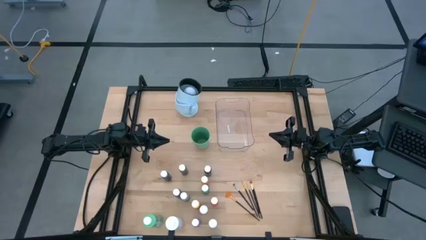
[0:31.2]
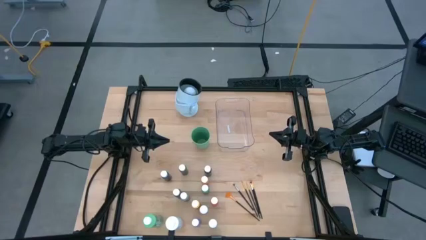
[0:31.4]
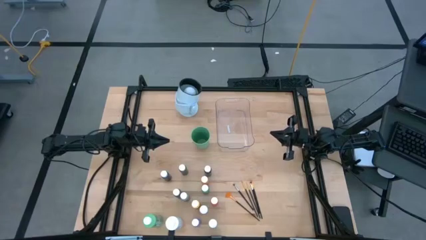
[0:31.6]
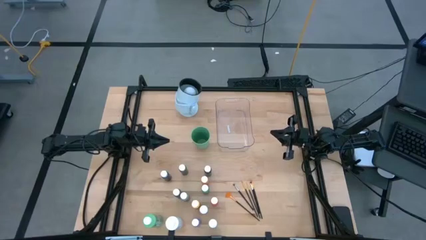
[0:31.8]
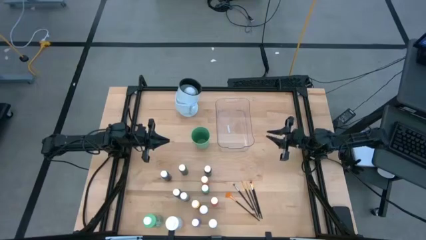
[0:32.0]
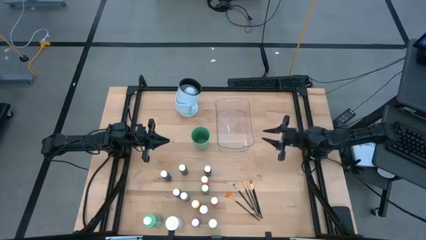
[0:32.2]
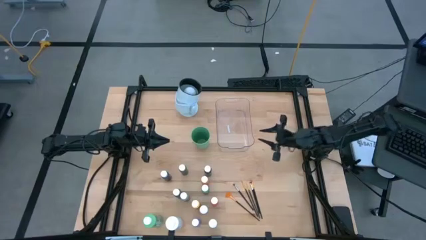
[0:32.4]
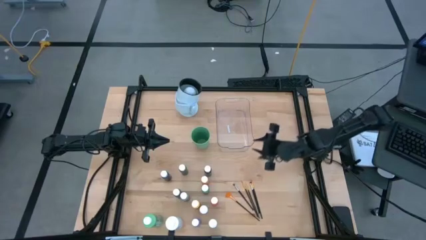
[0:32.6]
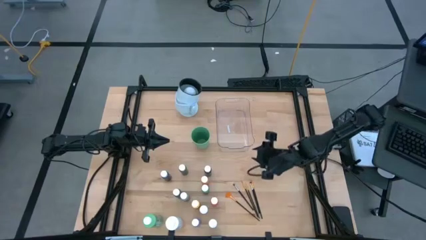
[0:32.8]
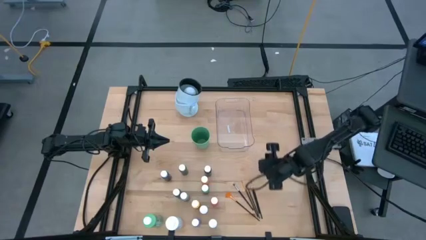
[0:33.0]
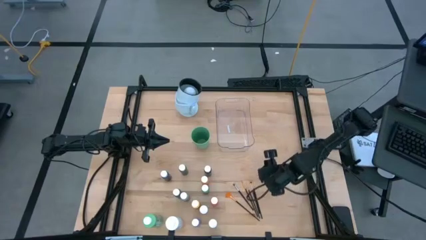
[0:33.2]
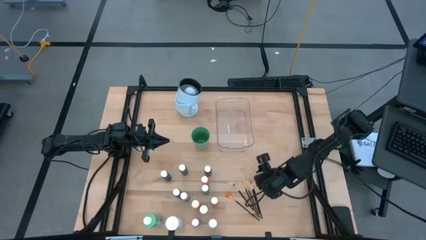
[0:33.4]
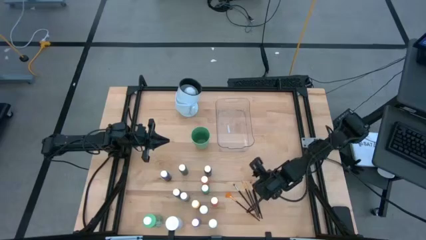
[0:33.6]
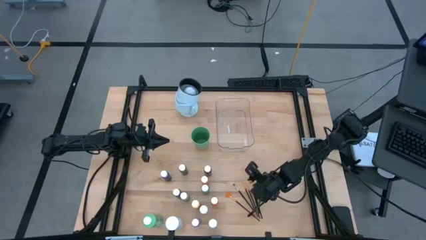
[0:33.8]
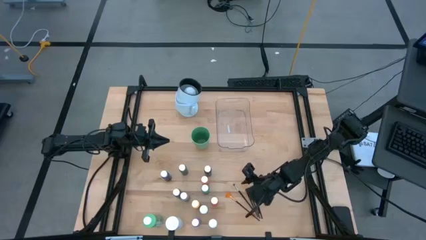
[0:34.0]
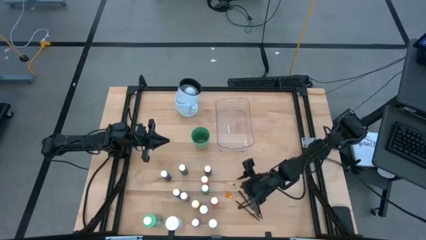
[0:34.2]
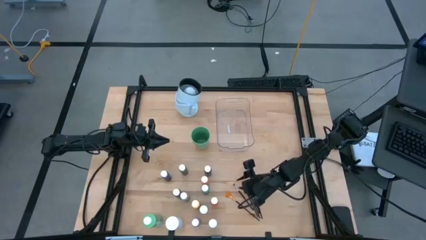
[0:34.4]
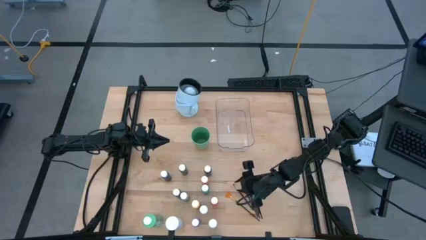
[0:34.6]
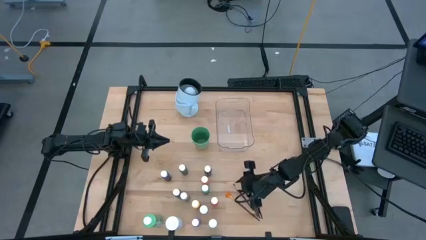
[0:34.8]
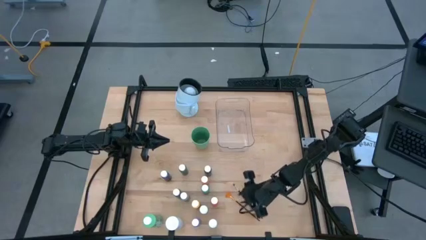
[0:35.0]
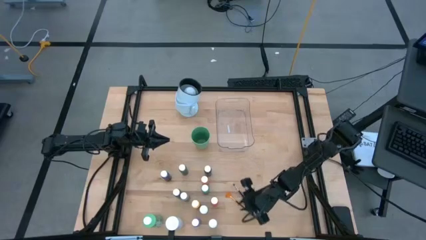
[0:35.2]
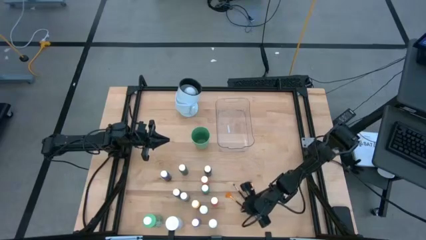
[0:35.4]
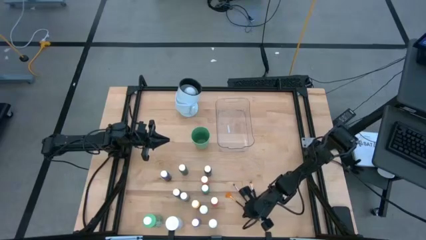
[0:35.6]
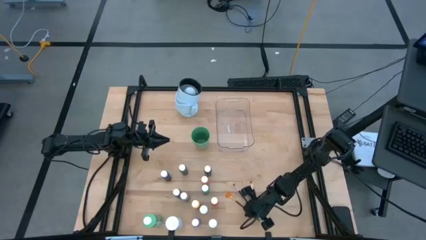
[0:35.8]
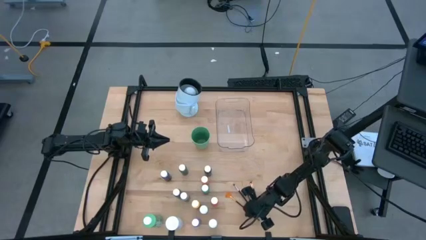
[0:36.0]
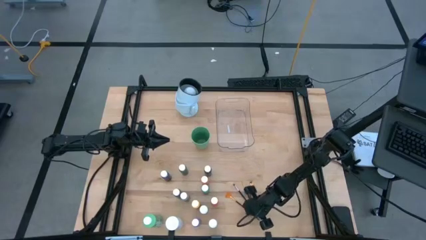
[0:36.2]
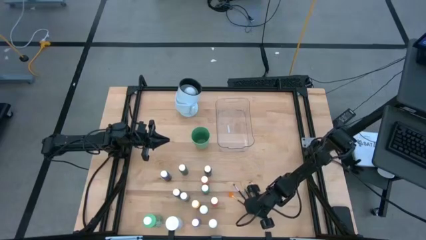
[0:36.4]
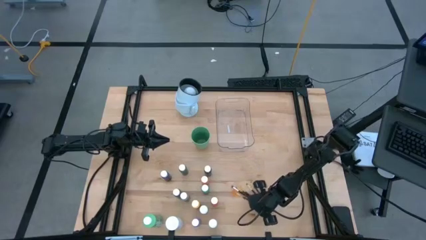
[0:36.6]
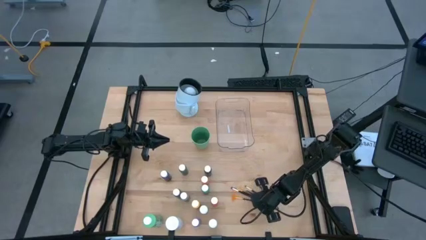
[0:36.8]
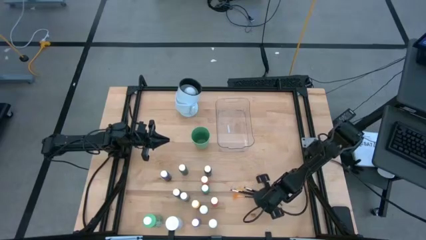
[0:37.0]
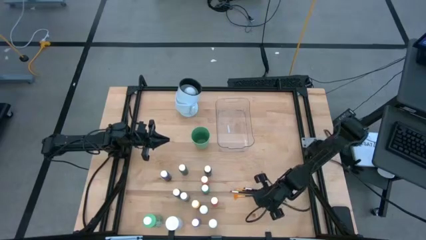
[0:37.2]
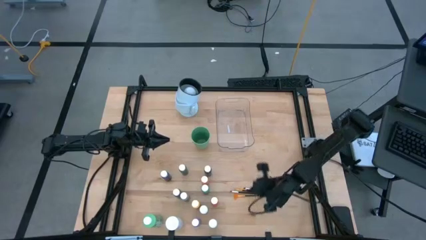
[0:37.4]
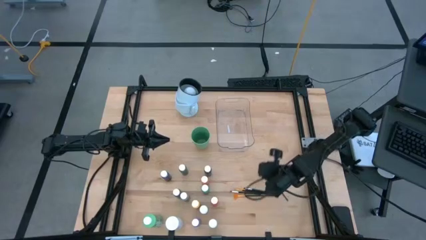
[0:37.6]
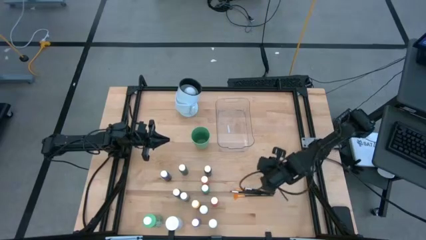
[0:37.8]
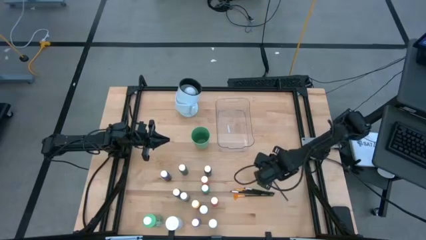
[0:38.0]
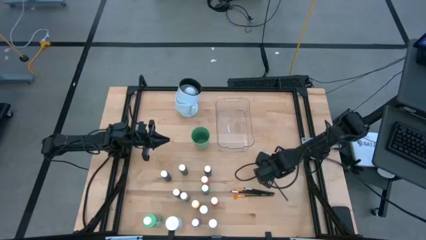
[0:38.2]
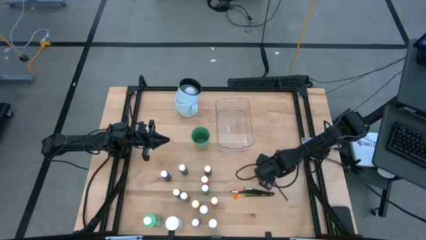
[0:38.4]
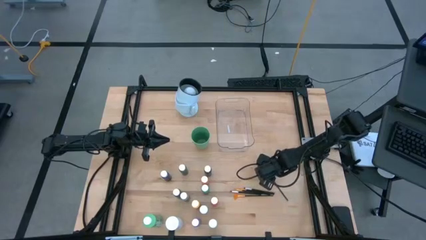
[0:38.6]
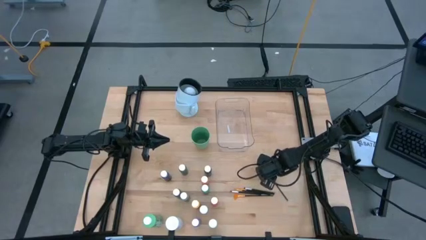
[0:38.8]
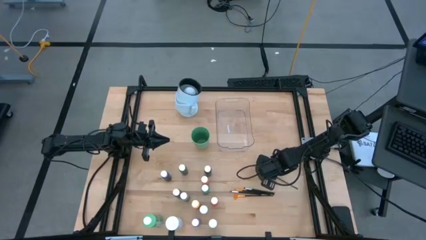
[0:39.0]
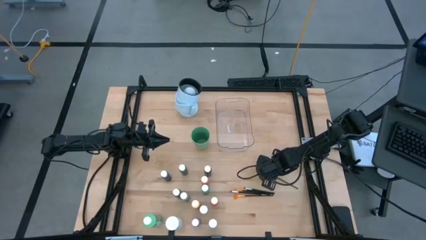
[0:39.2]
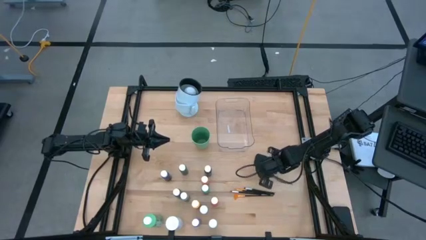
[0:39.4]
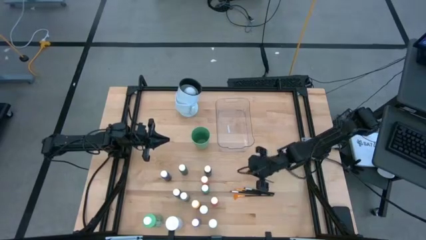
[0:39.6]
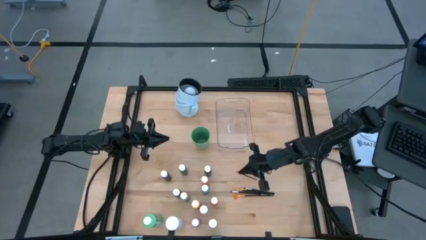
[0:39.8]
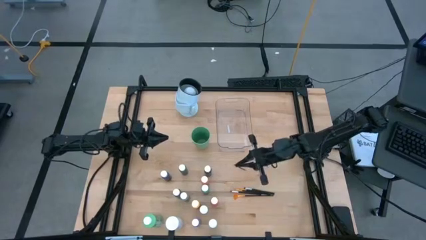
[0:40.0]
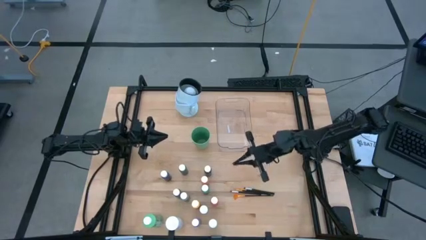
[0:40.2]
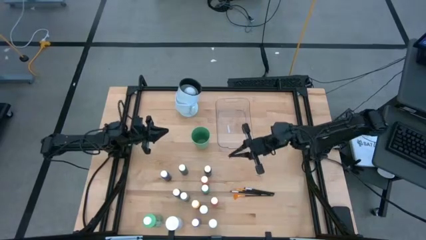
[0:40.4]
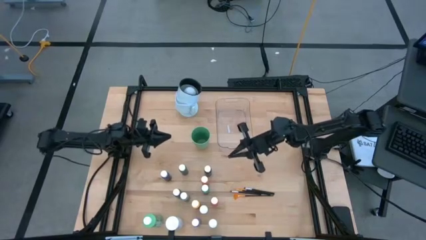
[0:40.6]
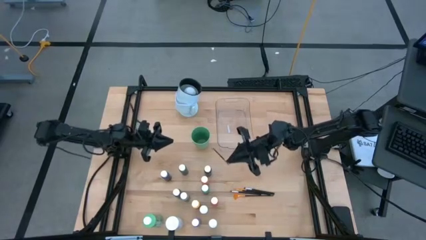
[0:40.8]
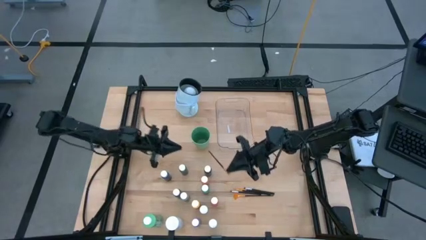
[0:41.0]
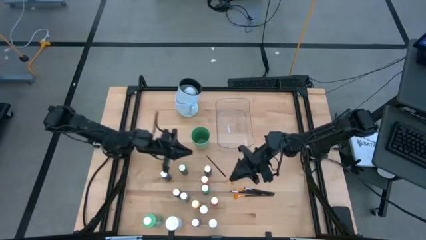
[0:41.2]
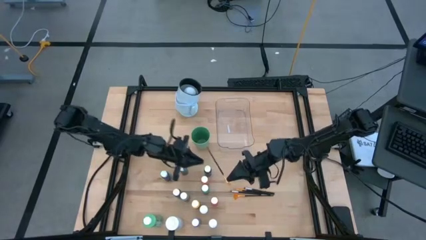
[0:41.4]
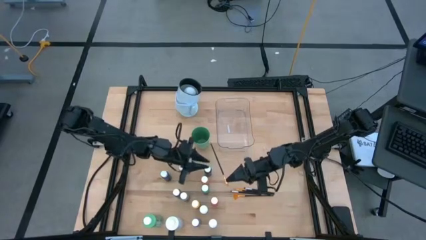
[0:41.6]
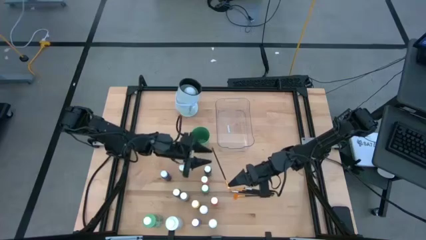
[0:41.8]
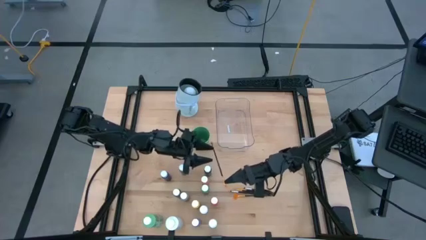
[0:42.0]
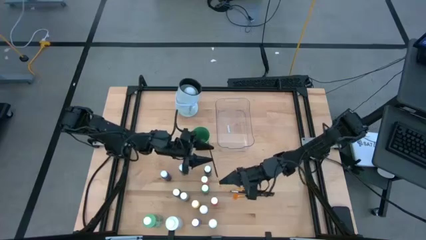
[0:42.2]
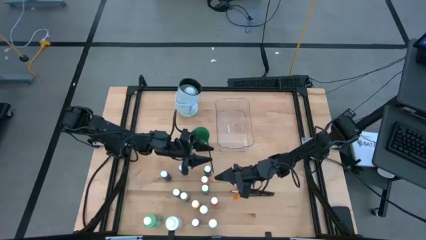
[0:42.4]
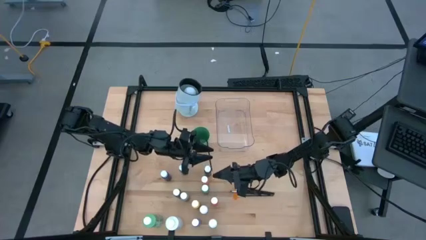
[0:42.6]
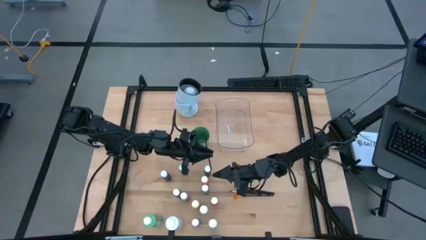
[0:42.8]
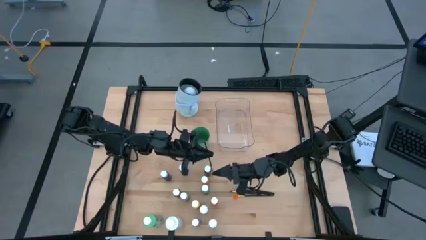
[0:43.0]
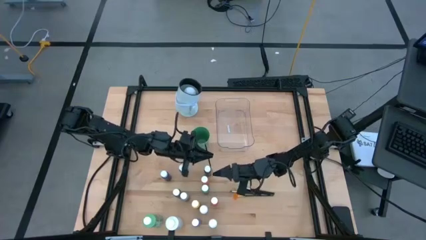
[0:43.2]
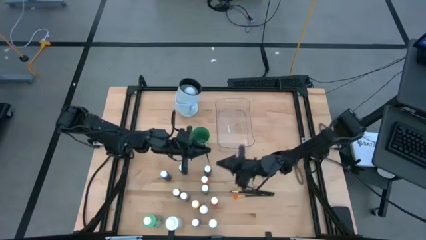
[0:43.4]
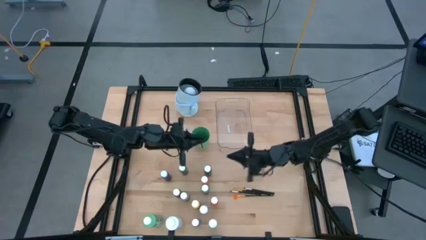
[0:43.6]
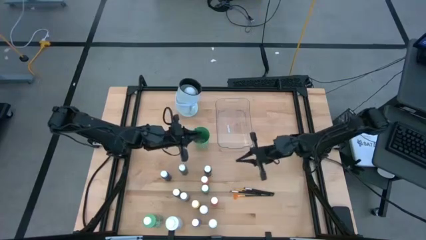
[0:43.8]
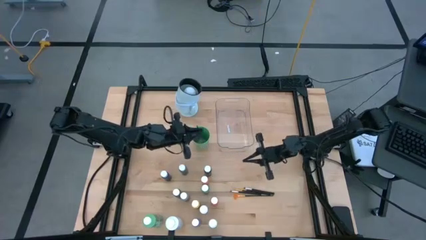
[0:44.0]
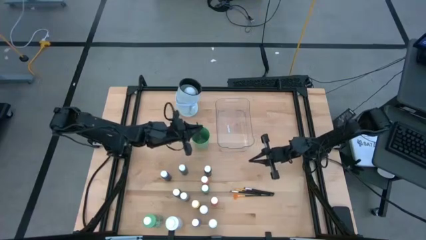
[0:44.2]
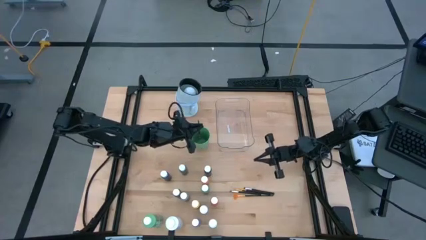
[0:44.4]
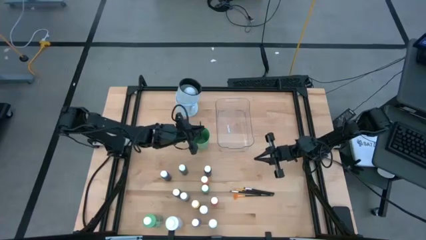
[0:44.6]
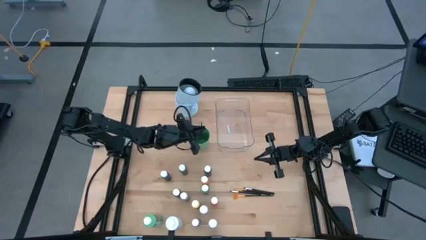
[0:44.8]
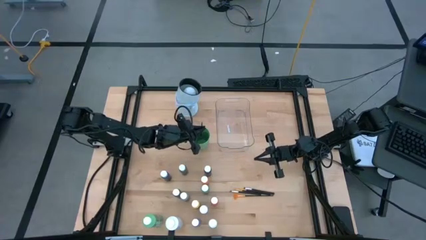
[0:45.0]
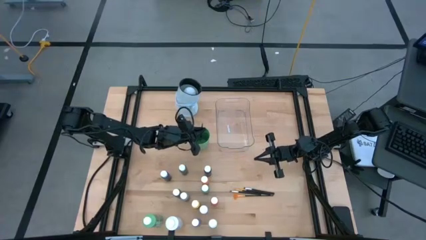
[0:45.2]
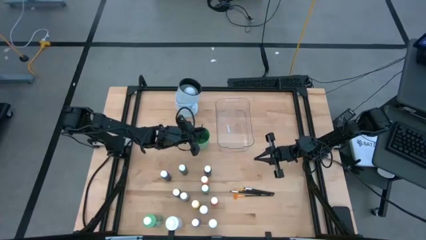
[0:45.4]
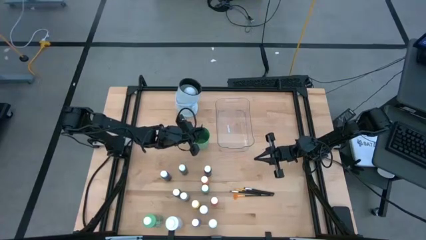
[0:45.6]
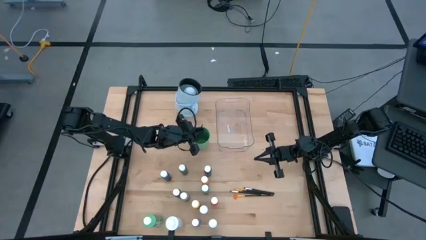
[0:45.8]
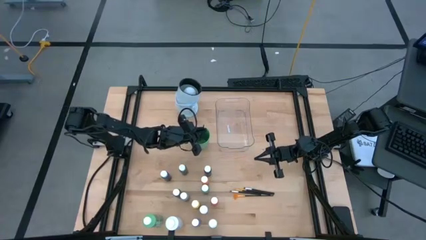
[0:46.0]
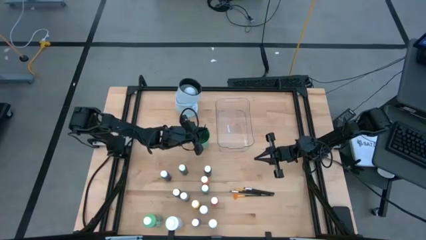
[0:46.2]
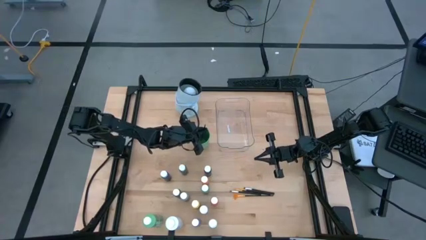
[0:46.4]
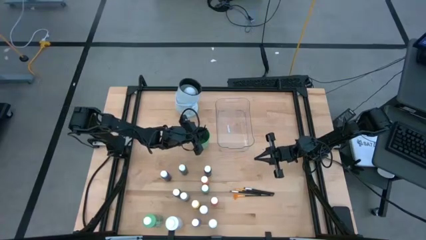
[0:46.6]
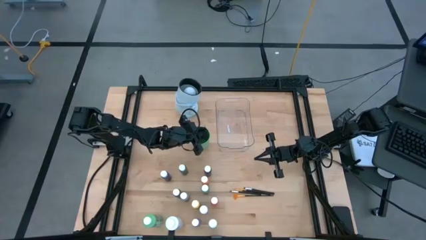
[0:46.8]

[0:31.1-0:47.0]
Task: Pick & Place Paint Supplies
Put the yellow paintbrush into the green cup

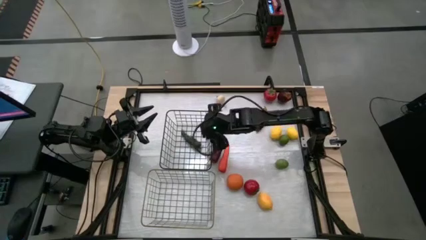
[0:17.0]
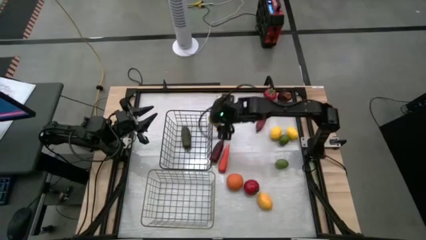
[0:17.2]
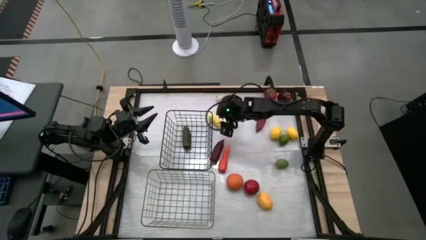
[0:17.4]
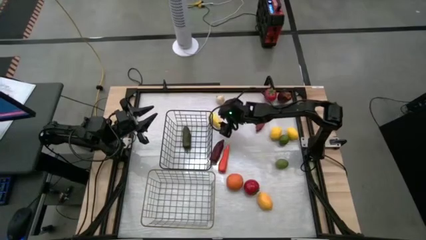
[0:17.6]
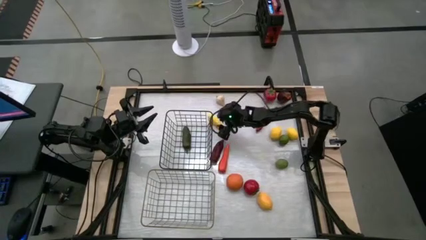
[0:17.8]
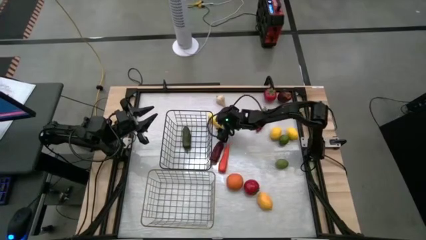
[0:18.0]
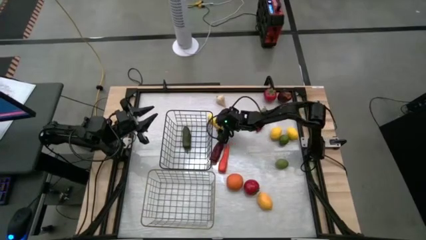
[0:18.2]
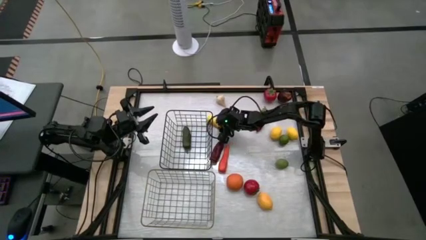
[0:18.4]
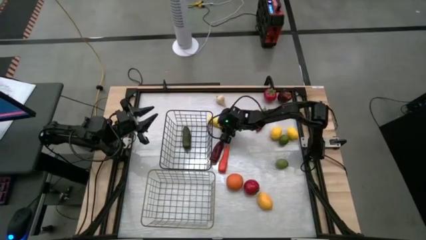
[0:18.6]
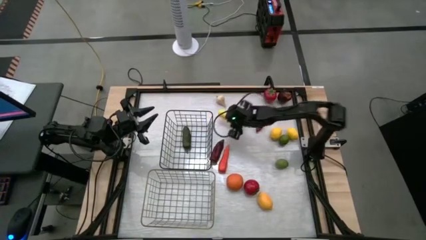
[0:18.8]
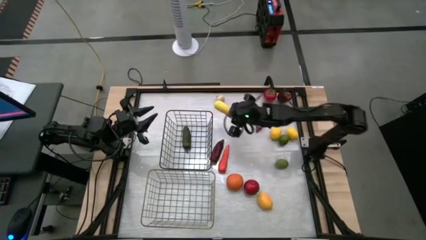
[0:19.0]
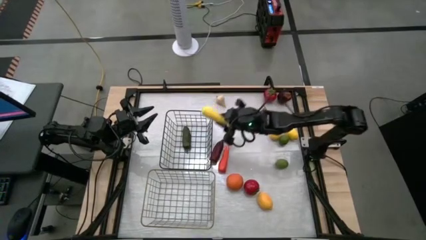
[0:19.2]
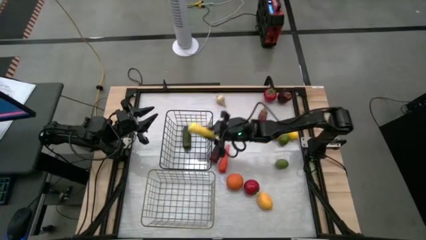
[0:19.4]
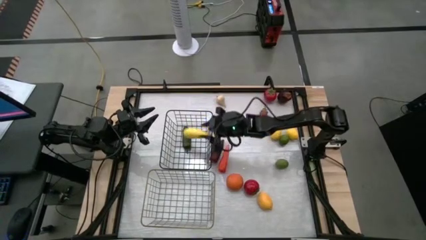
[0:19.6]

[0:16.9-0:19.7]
Task: Sort produce into baskets
Put the corn into the black wire basket
